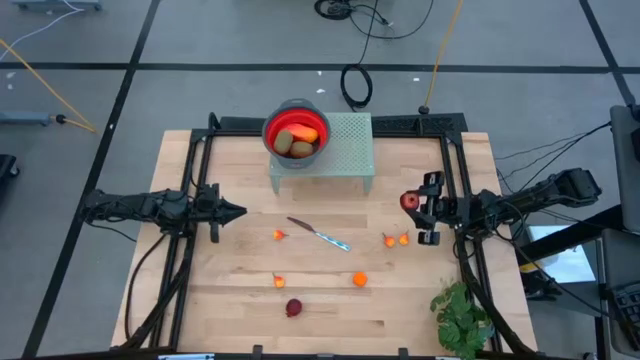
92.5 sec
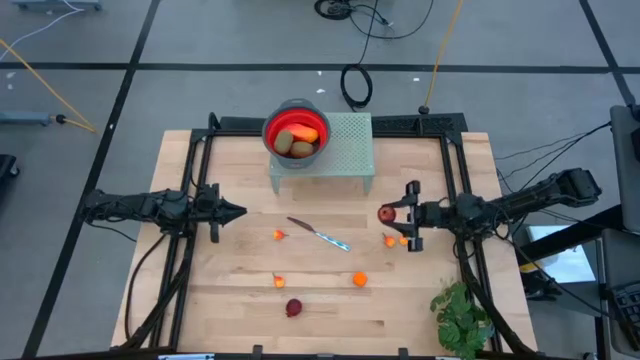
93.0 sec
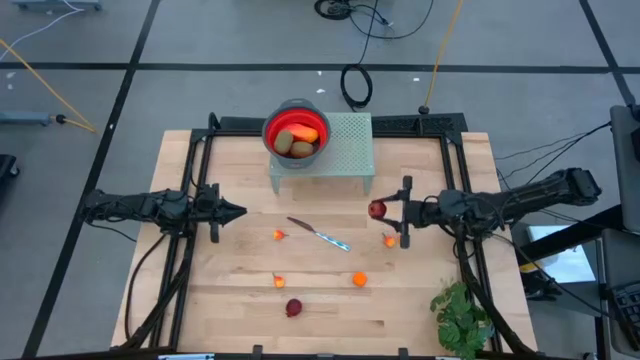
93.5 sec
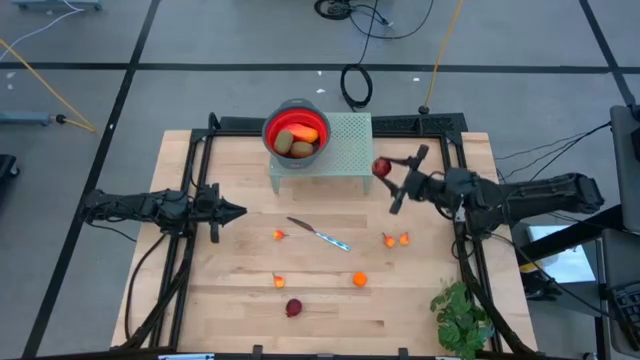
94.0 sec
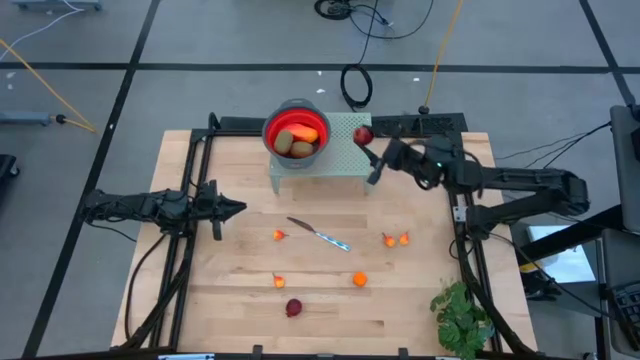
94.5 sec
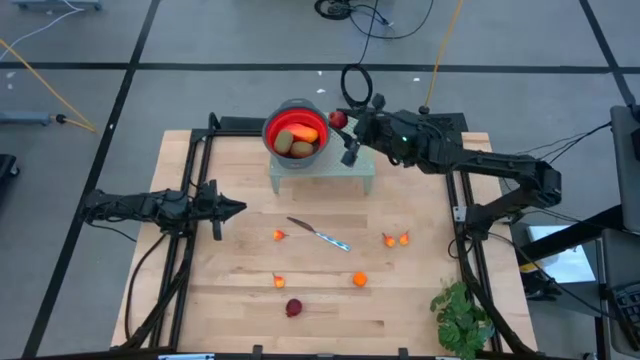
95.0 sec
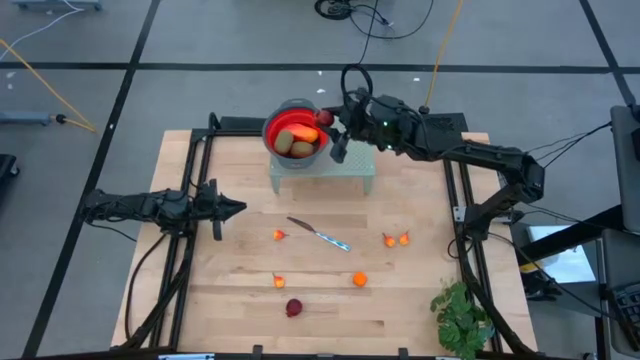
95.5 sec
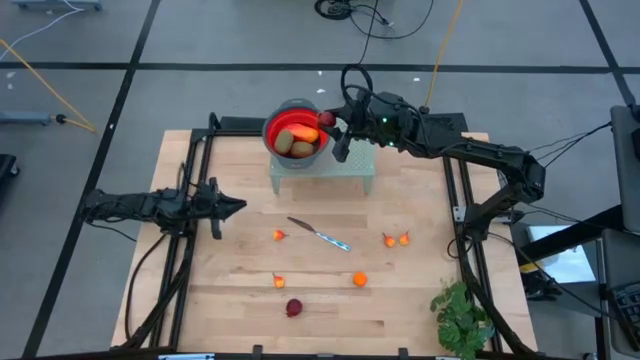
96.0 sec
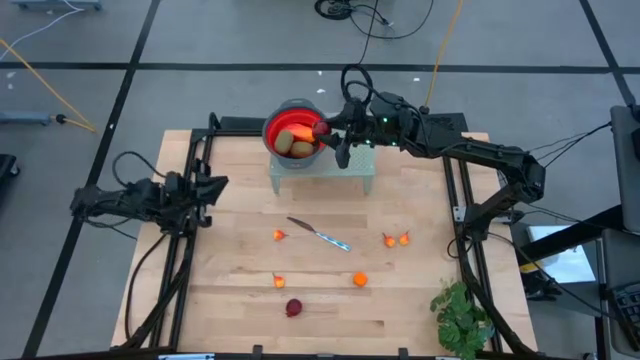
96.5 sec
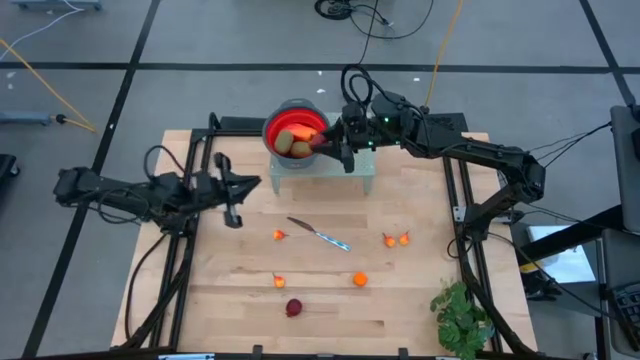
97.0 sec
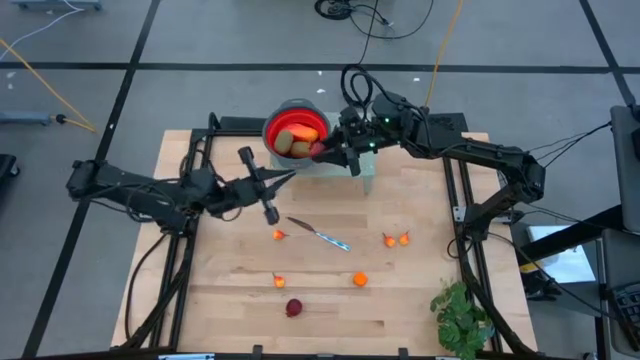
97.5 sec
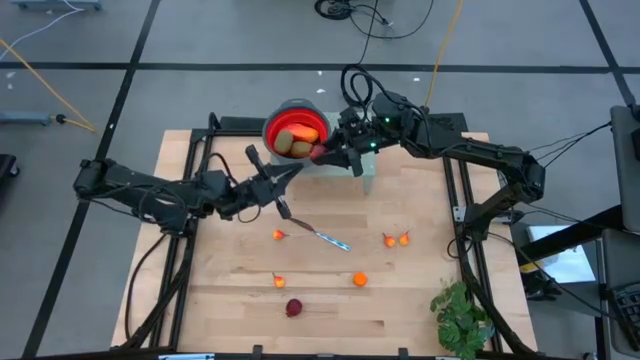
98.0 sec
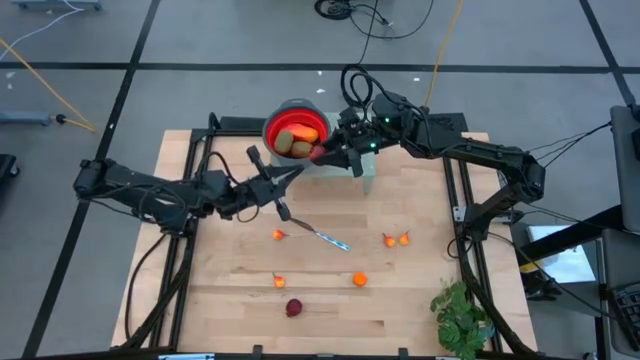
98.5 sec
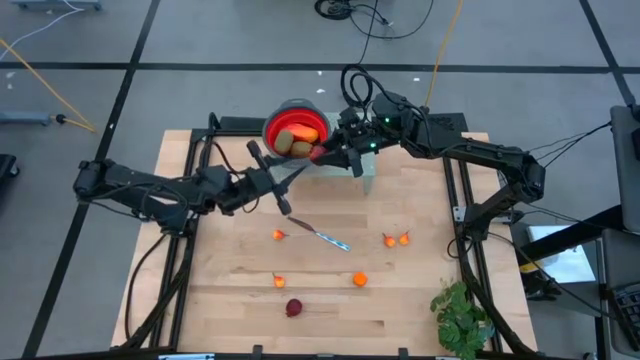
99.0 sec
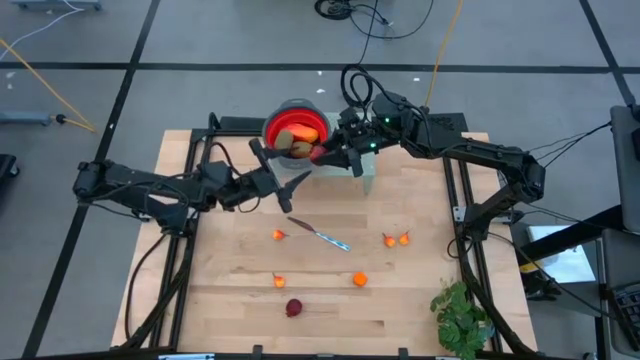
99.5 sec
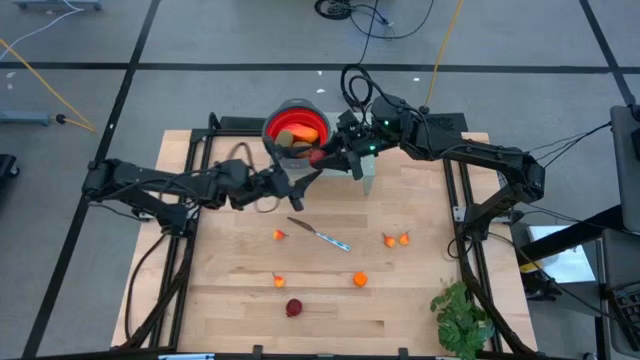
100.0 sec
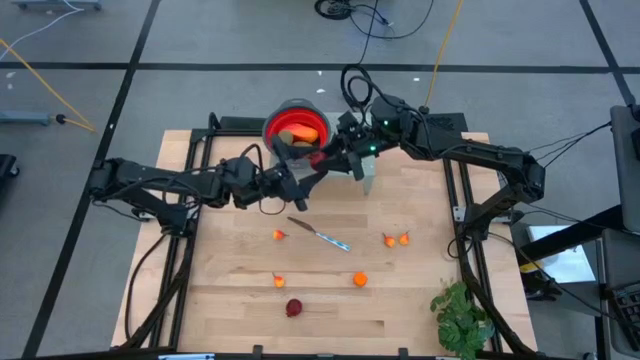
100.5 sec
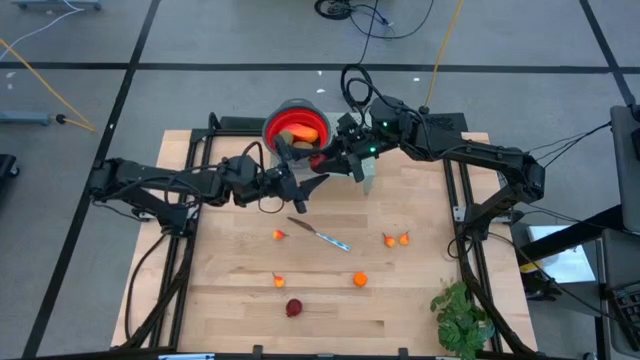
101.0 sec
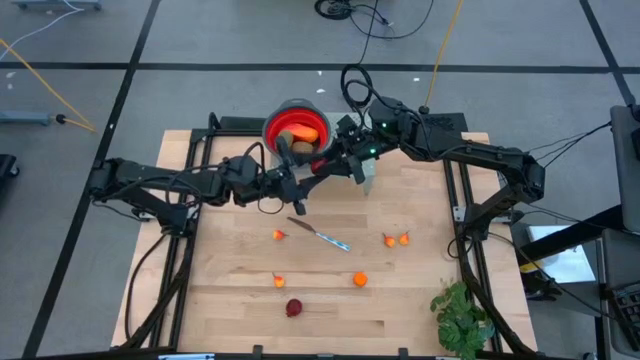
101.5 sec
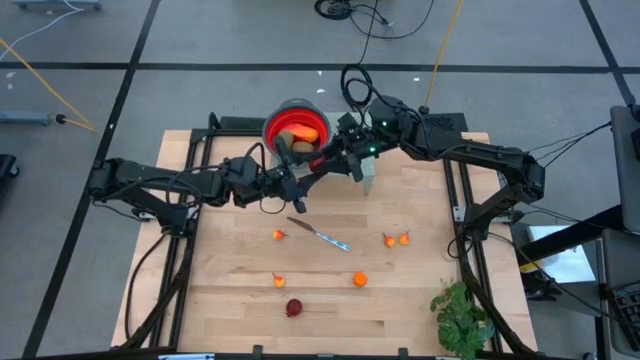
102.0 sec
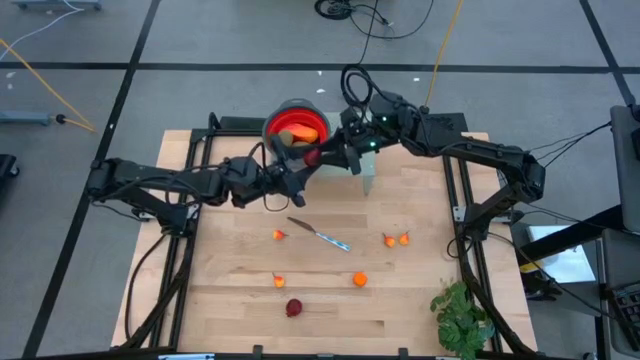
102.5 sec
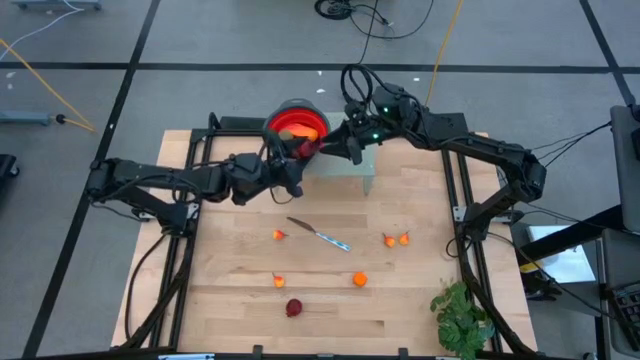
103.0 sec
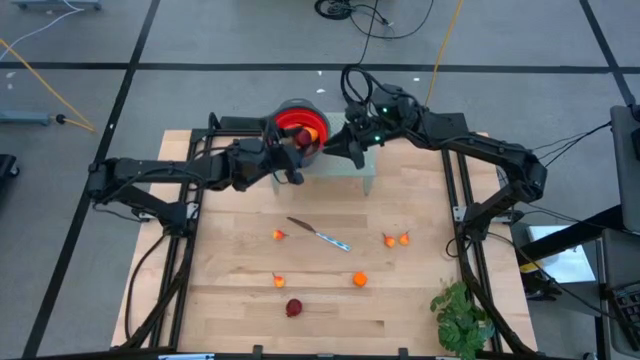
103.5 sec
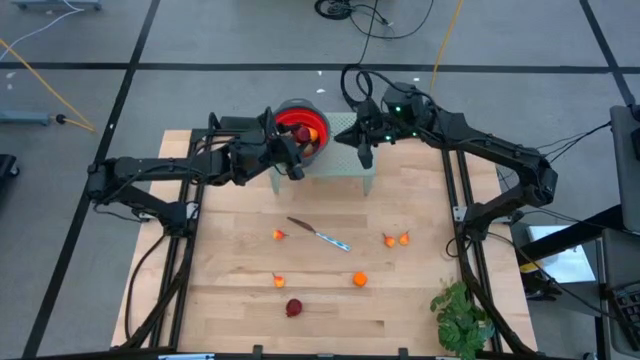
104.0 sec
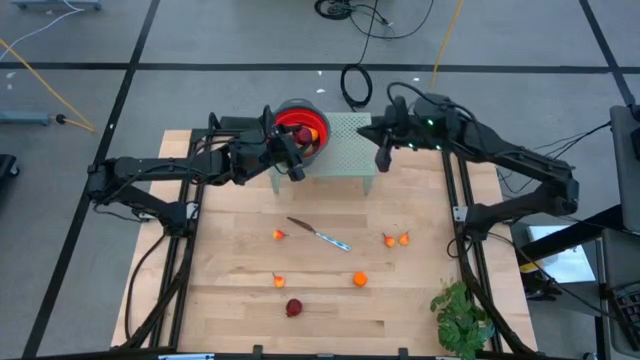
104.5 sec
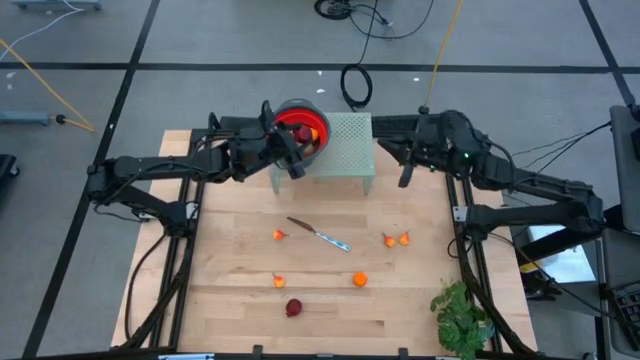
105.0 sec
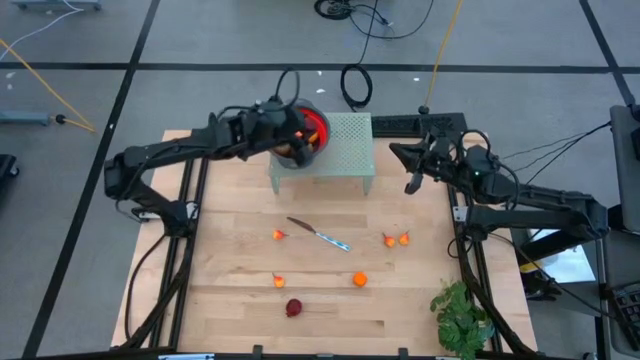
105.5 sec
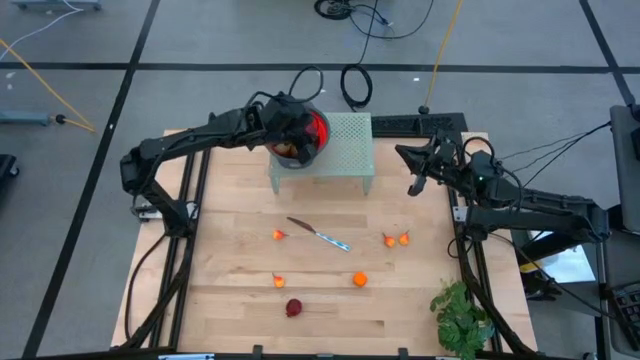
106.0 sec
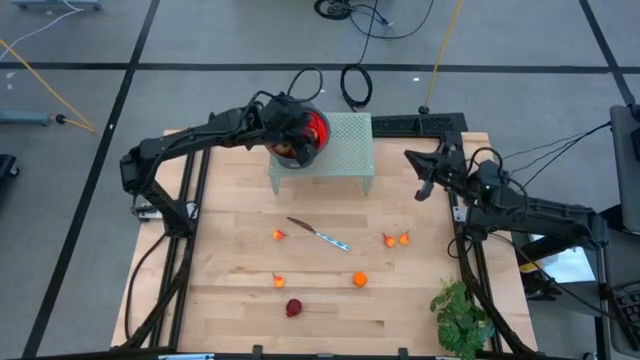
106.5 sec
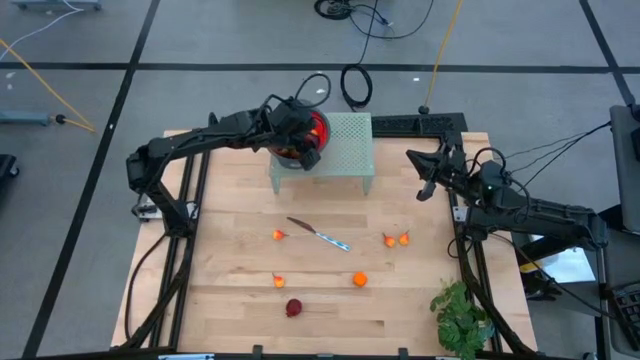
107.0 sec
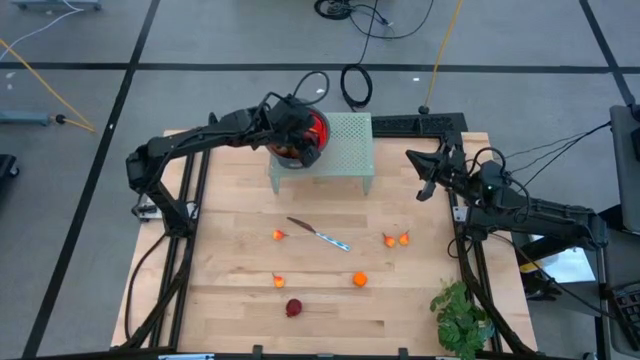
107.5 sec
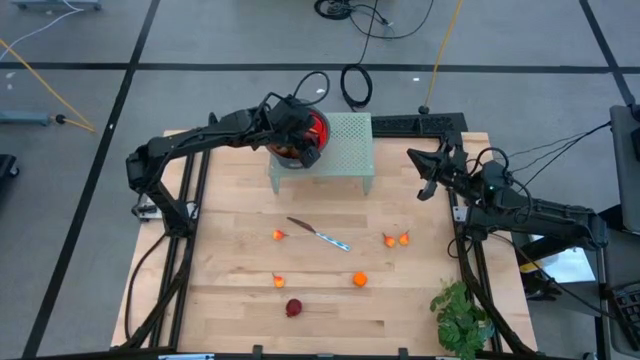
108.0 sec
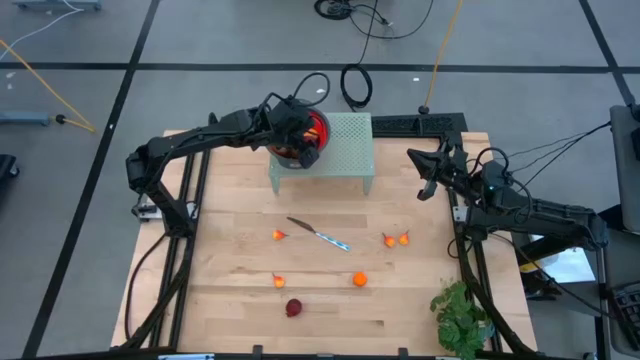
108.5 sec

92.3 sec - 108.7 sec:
Task: Pick & Place Fruit
Put the pomegranate into the red strainer bowl

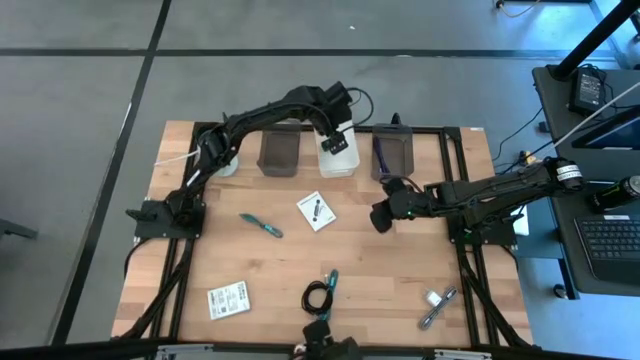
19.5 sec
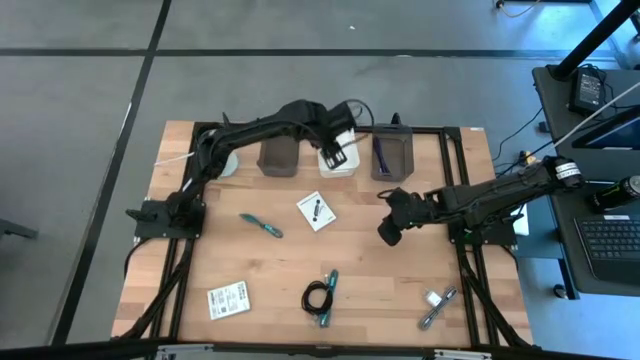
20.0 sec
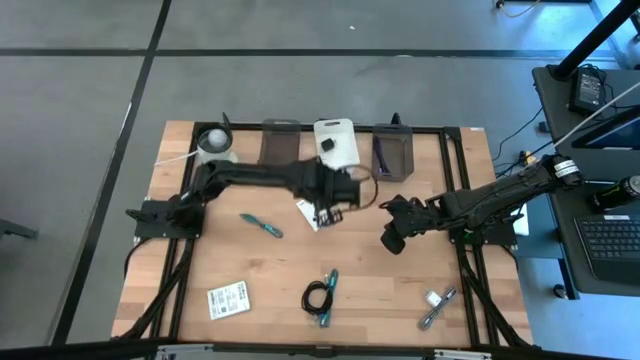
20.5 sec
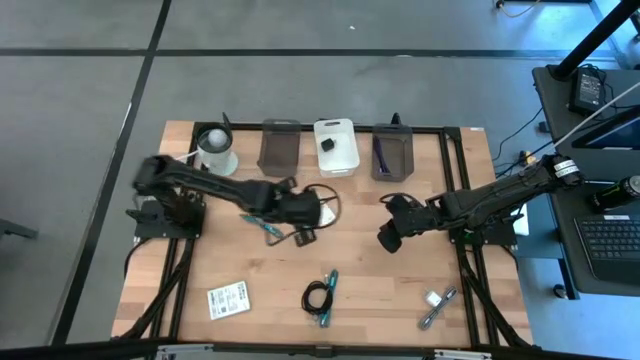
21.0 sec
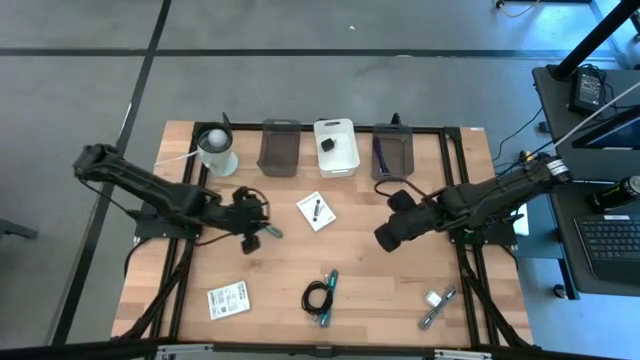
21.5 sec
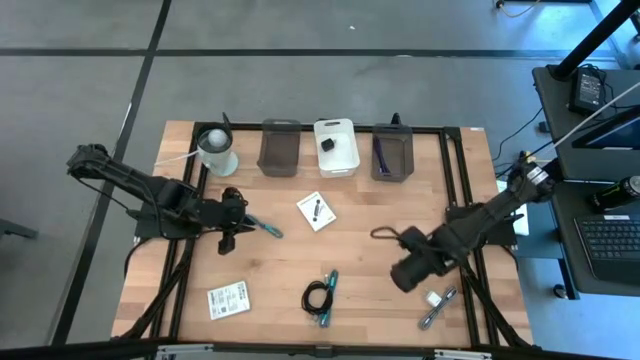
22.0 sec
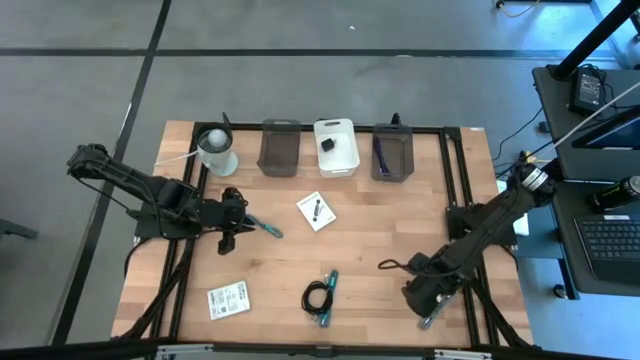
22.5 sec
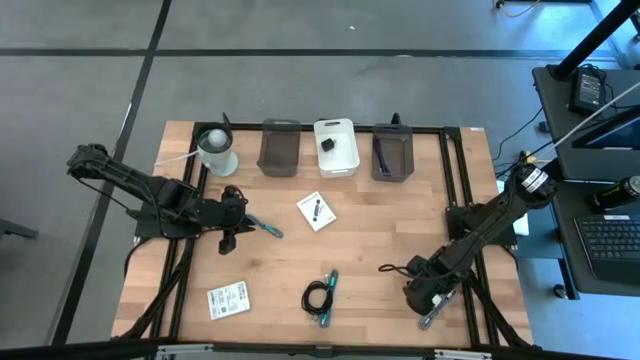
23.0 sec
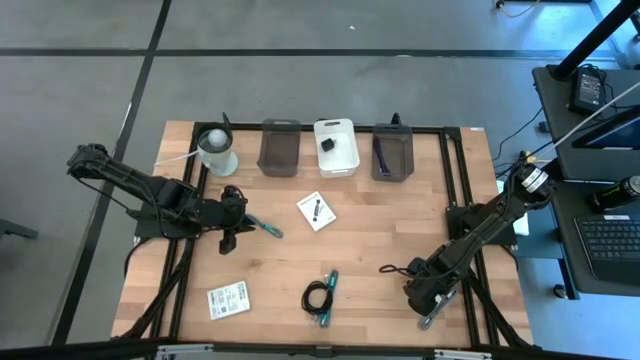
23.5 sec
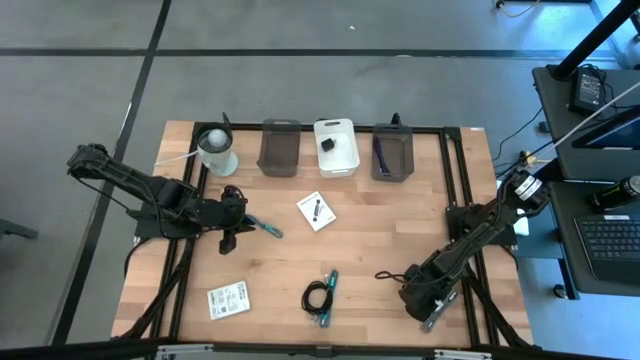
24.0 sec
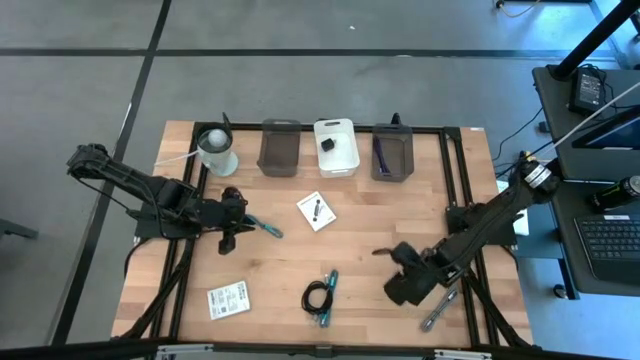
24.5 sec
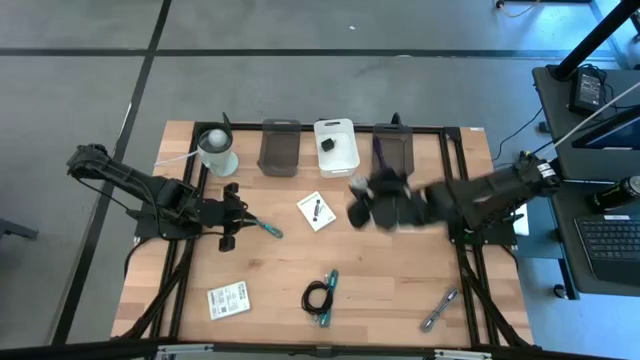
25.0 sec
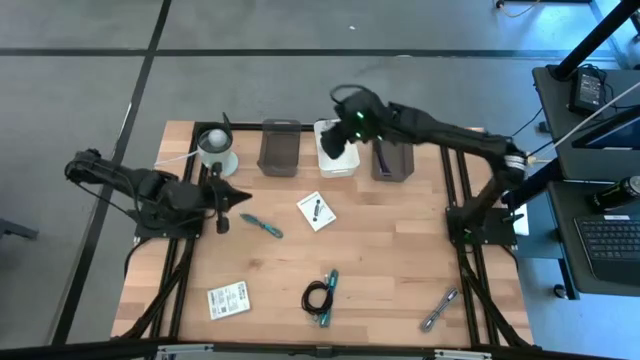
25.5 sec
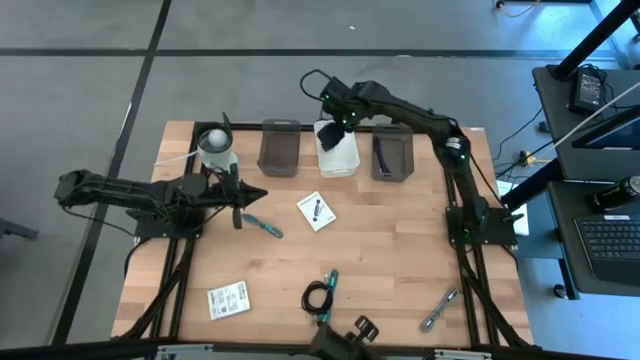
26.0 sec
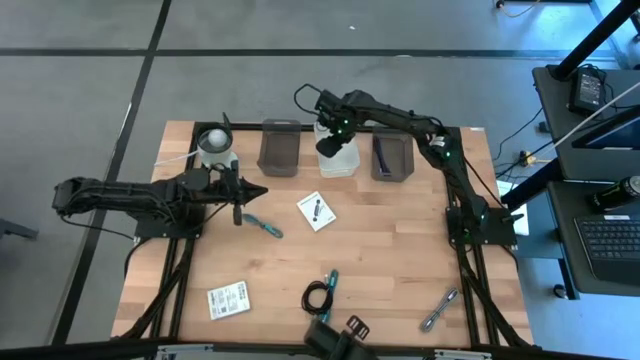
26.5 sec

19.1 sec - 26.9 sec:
Task: Pick and place items into bin
Put the white charger adapter into the white bin
